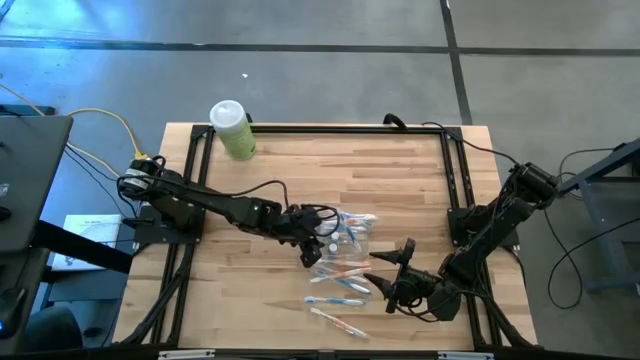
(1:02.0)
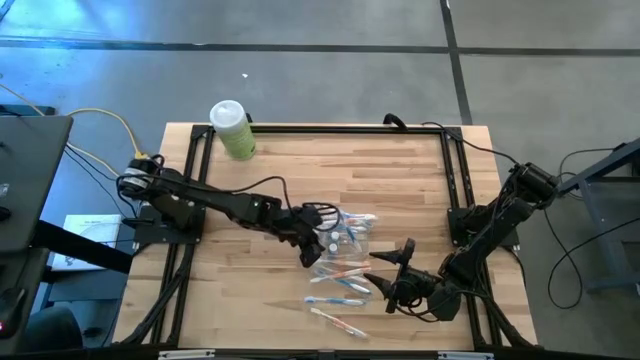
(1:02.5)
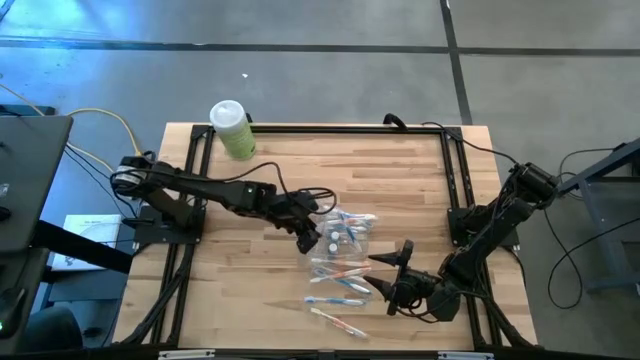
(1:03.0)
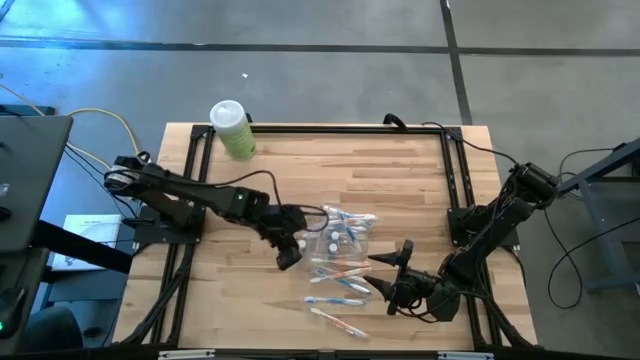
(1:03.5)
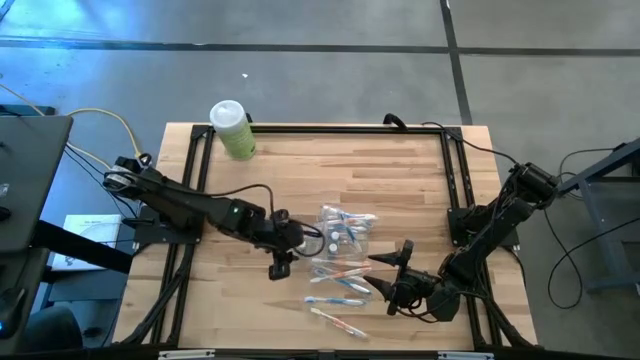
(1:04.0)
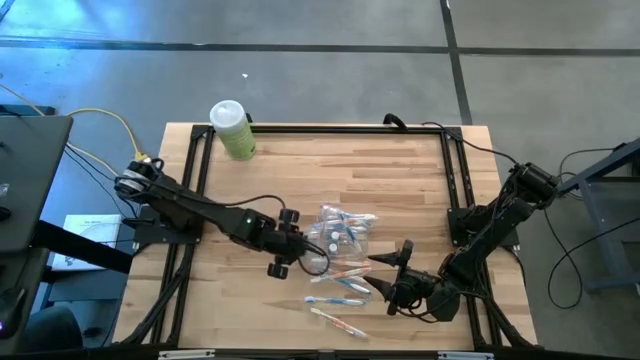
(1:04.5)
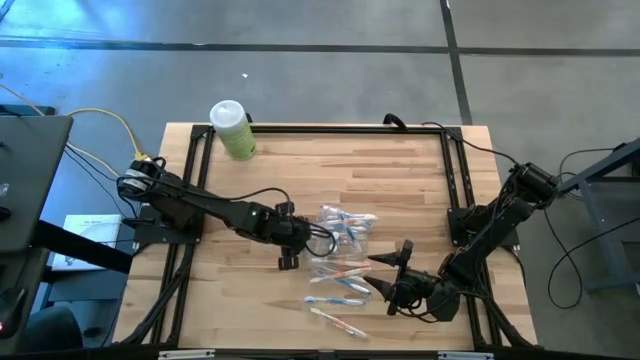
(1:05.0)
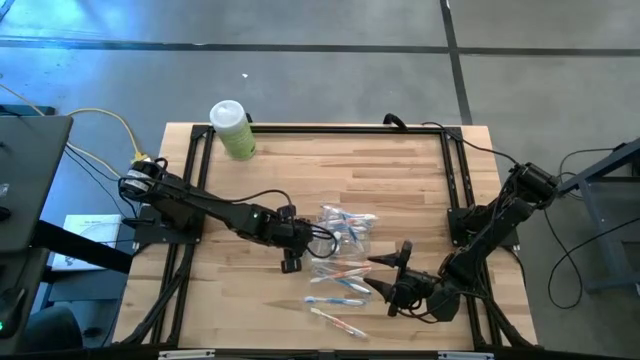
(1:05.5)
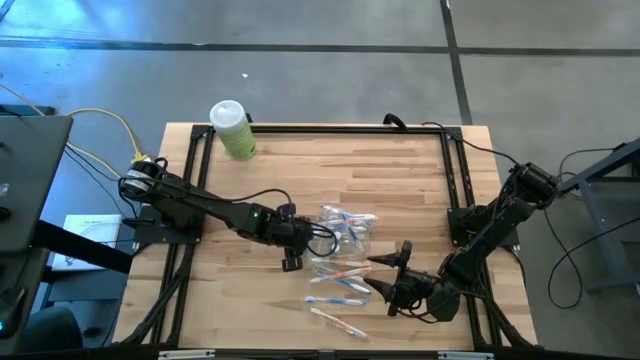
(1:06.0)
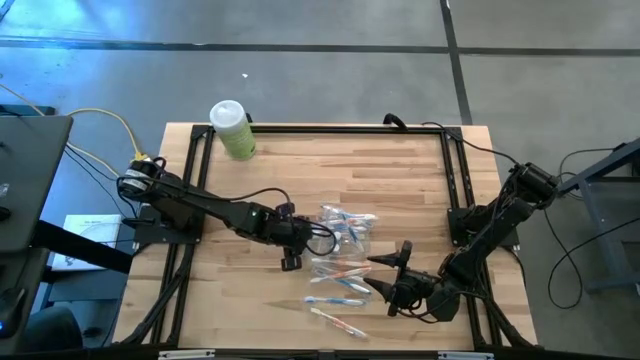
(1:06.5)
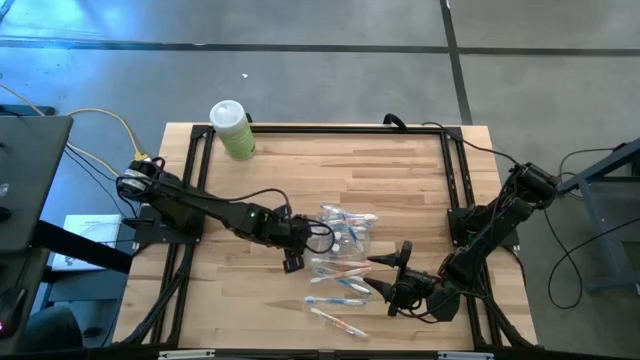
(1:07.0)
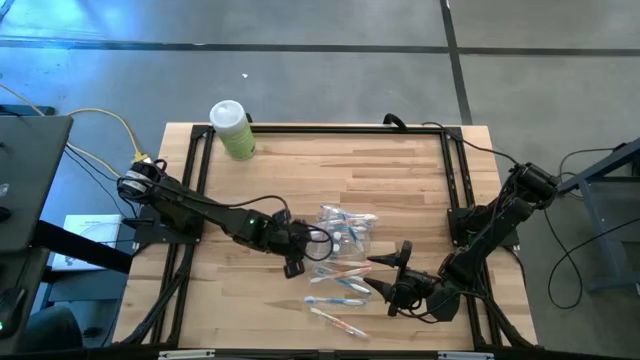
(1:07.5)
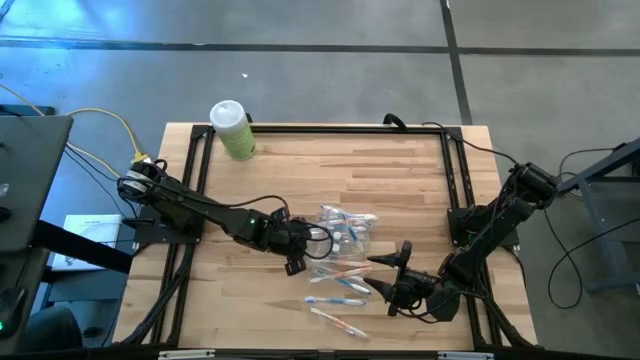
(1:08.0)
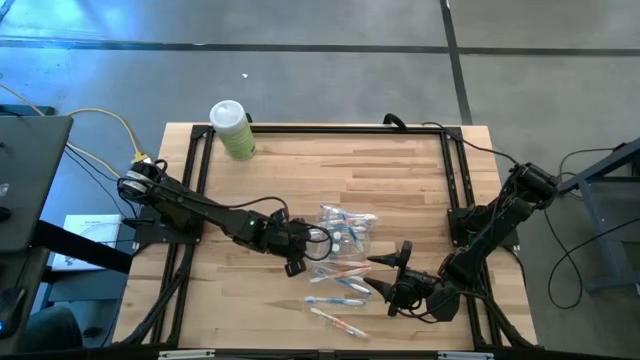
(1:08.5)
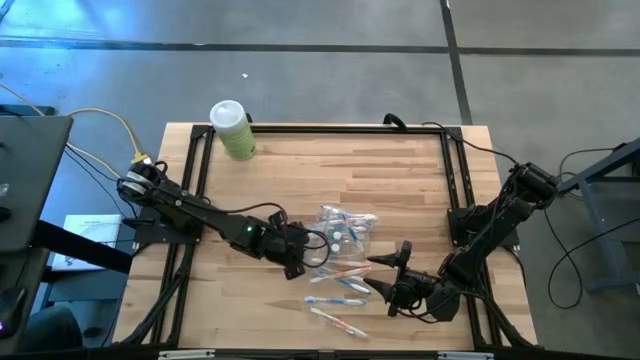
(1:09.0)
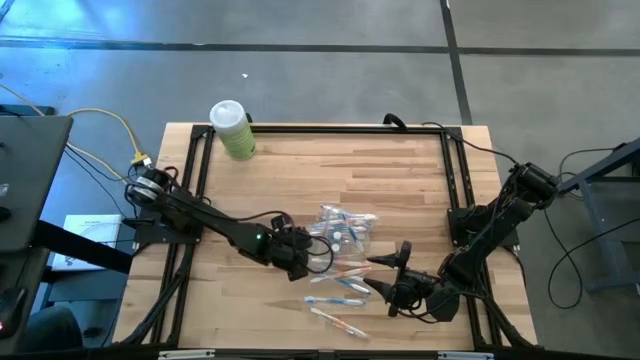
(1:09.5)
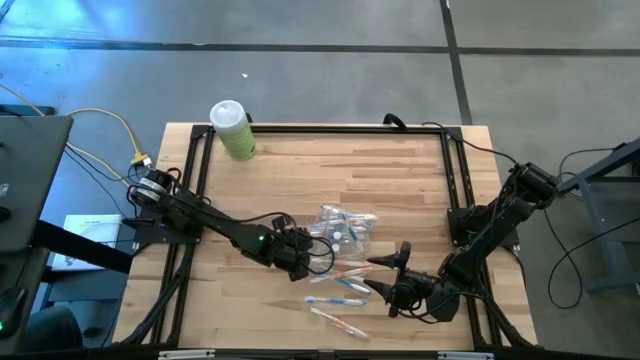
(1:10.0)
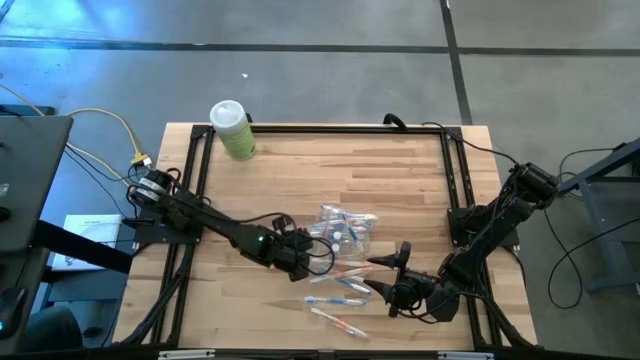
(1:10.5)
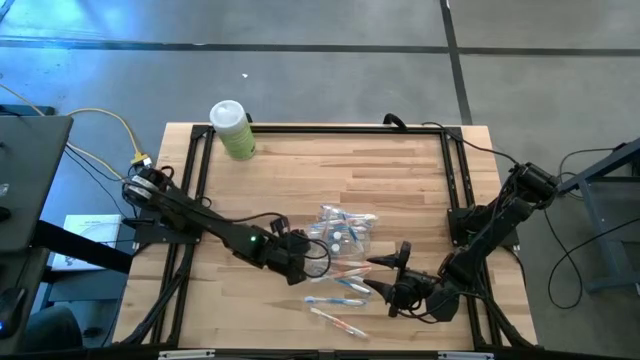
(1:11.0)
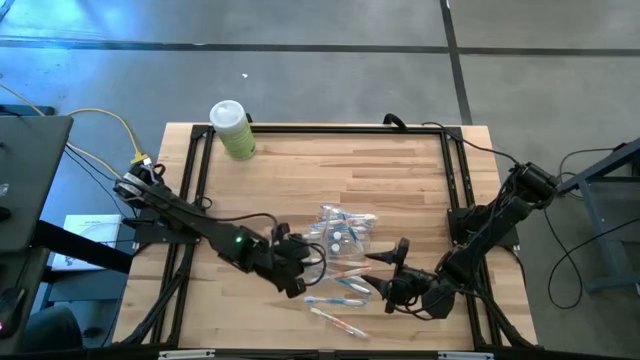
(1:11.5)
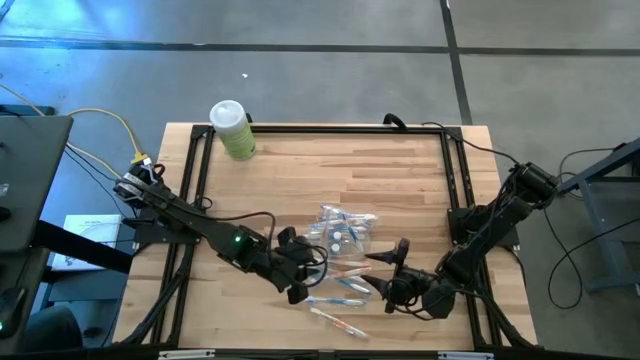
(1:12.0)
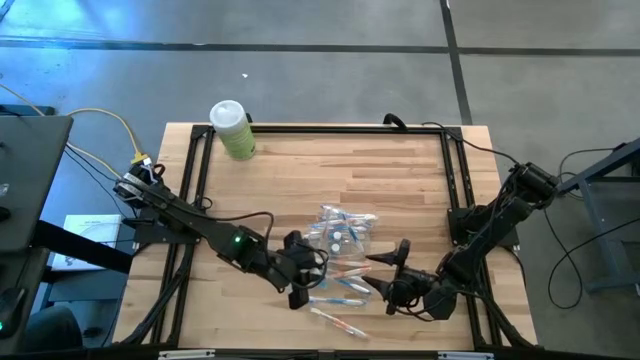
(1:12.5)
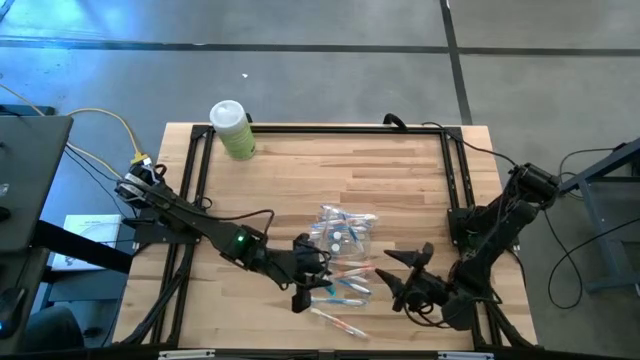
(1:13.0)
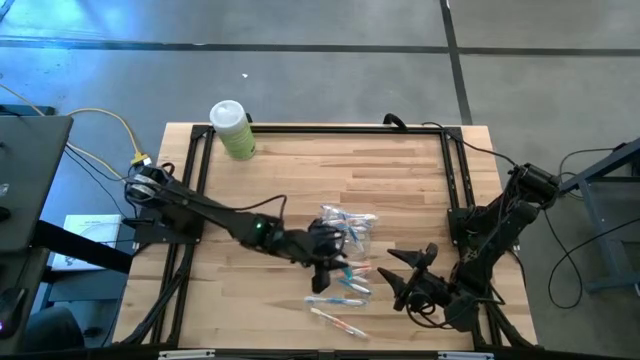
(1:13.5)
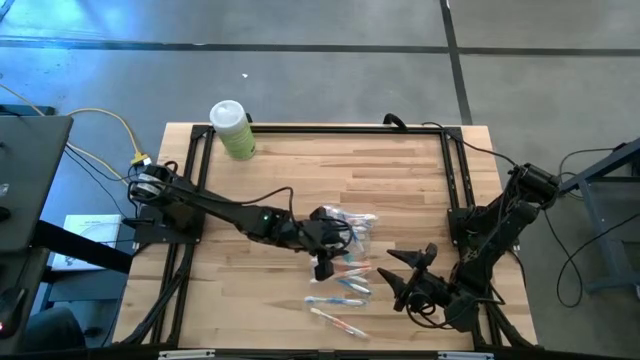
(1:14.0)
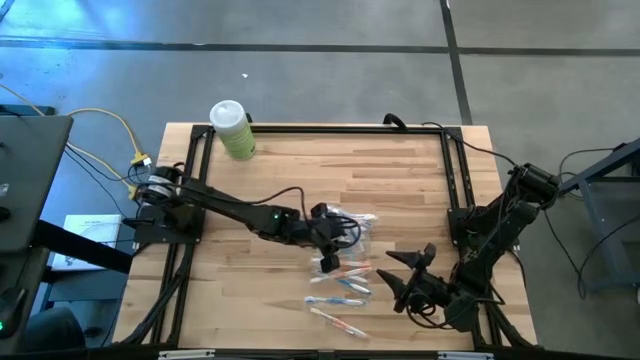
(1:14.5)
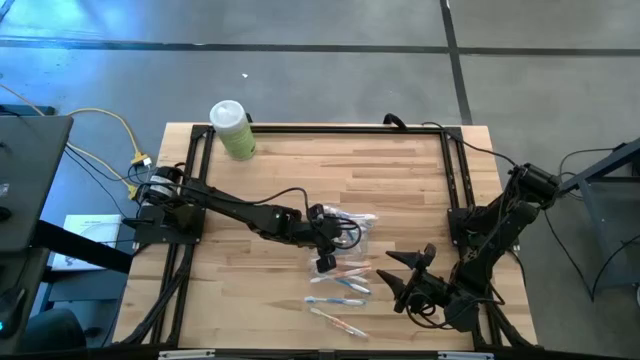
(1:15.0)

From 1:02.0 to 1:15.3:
Task: Pick & Place toothbrushing station
Put the mouthwash into the transparent organizer

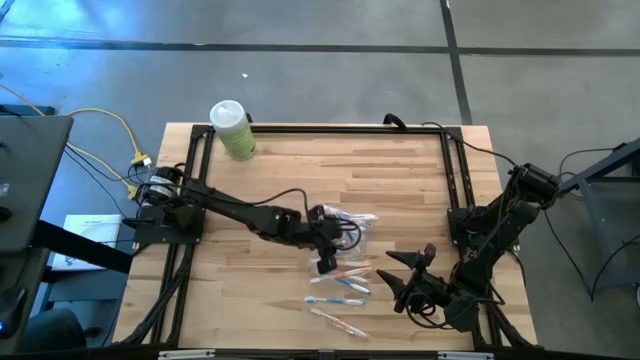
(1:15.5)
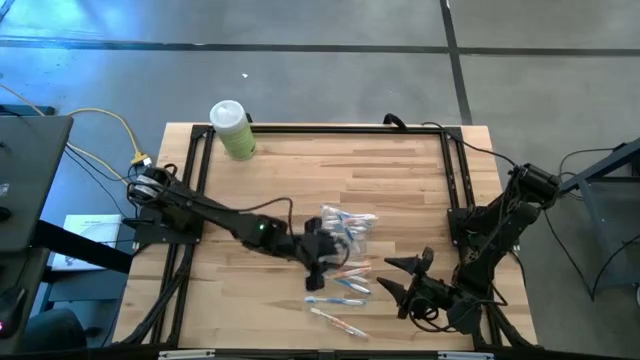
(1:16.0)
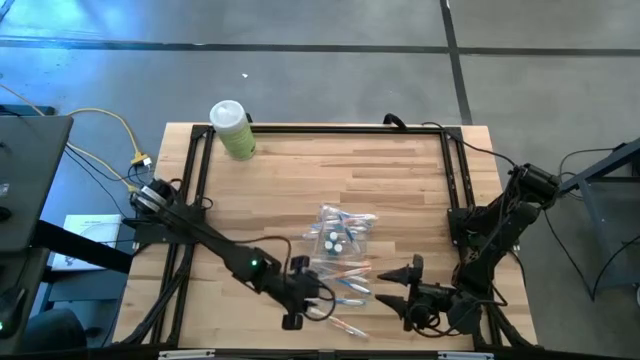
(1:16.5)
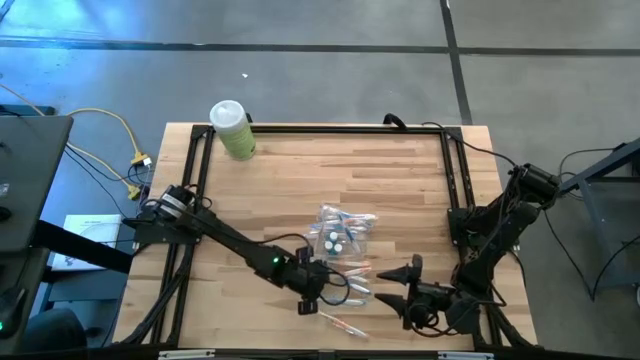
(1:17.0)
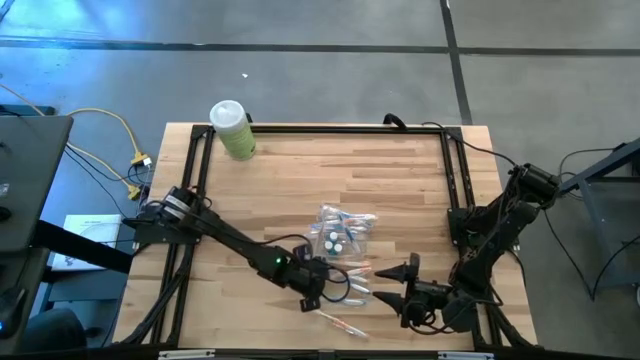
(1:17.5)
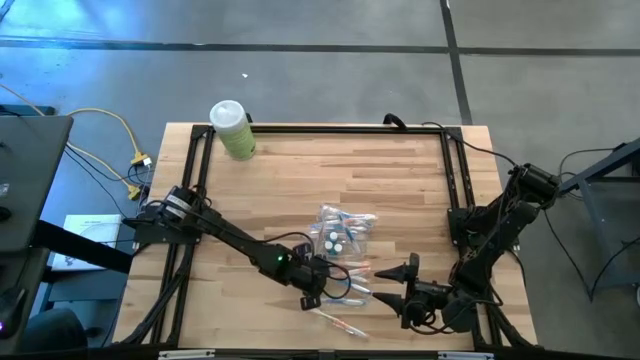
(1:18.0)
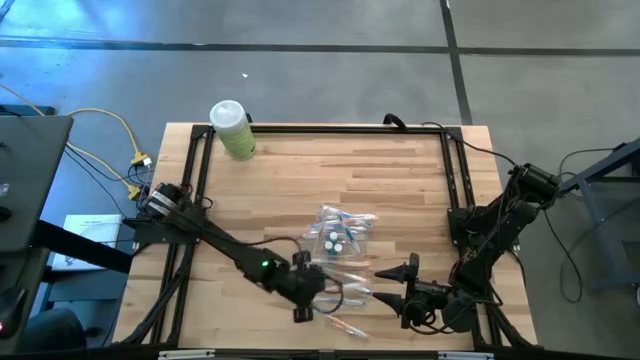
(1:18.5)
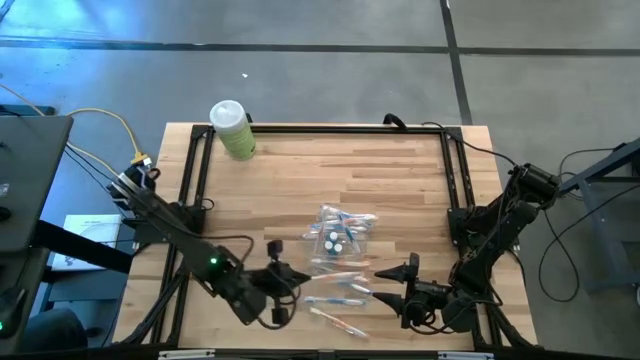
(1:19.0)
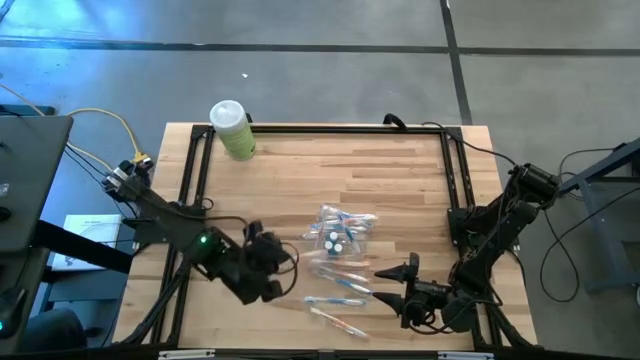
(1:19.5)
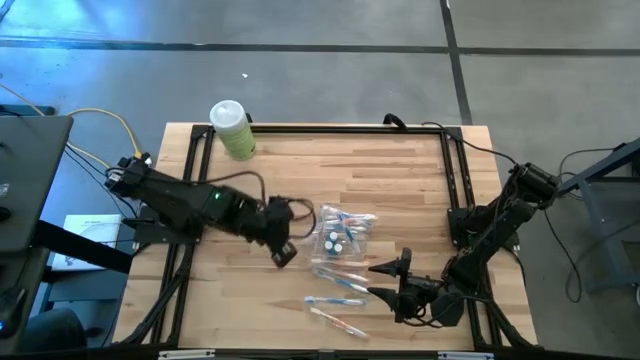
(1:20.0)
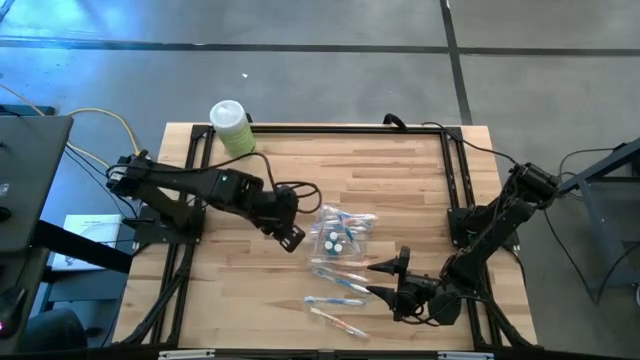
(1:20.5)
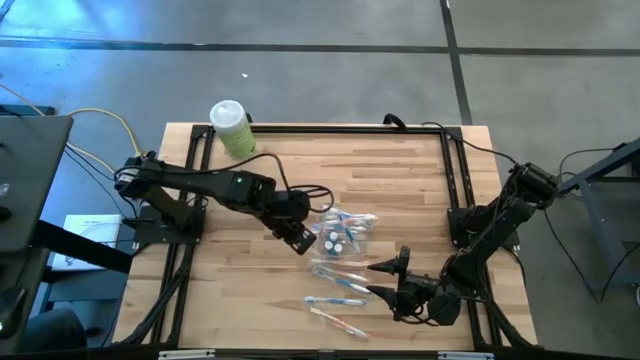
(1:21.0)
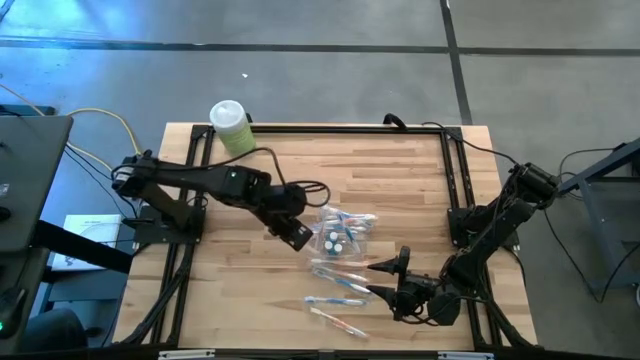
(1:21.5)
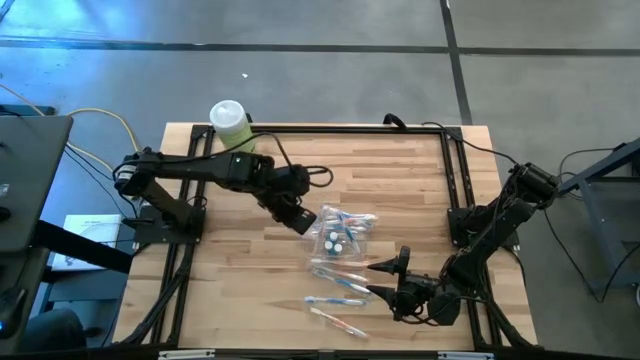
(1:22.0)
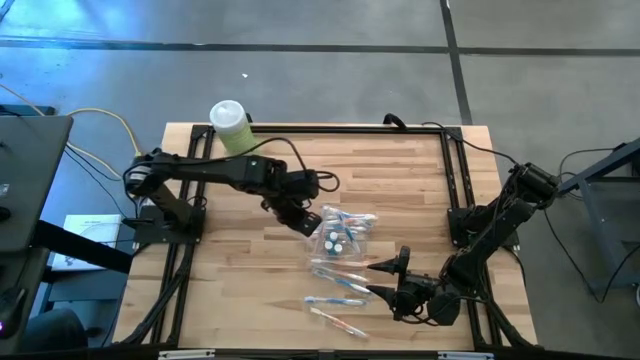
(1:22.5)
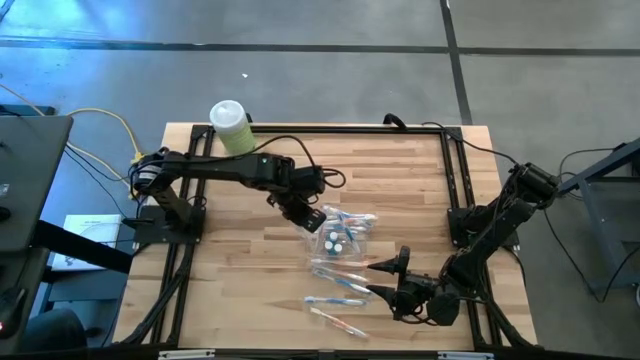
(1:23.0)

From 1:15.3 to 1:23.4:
Put the orange toothbrush into the transparent organizer
